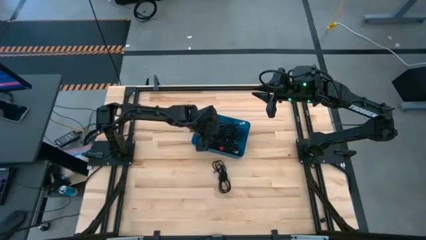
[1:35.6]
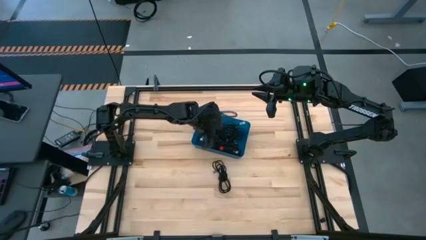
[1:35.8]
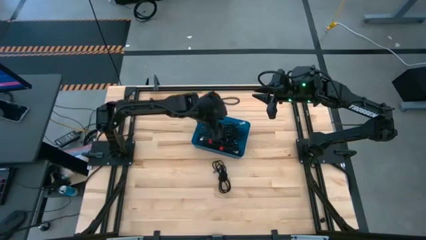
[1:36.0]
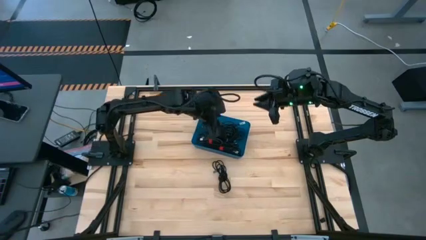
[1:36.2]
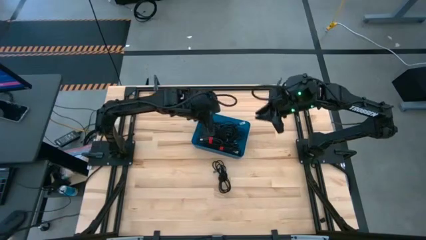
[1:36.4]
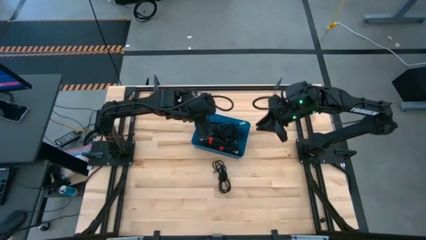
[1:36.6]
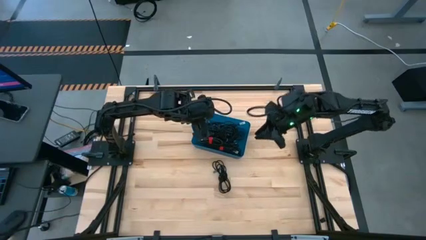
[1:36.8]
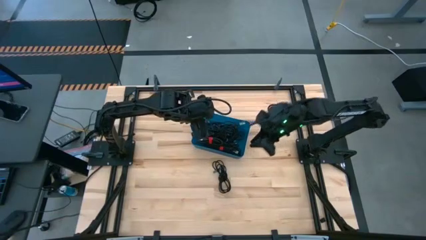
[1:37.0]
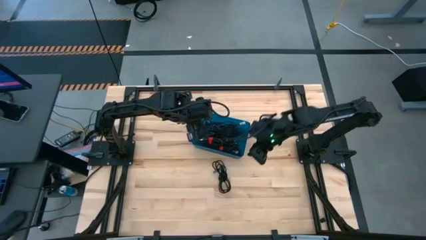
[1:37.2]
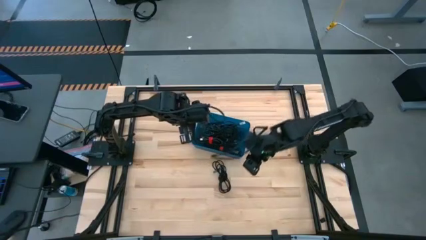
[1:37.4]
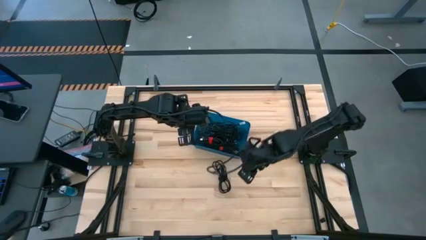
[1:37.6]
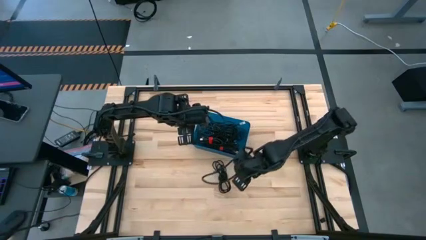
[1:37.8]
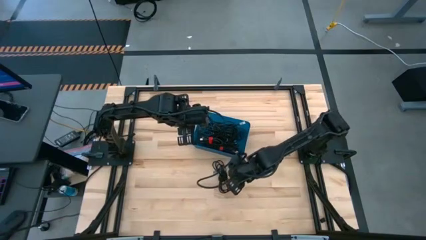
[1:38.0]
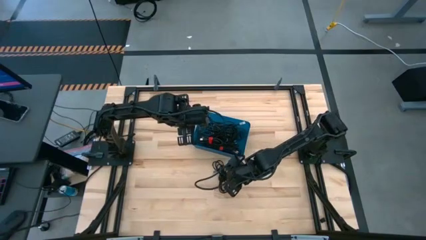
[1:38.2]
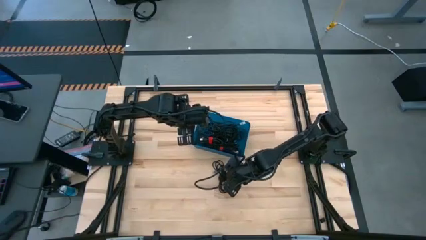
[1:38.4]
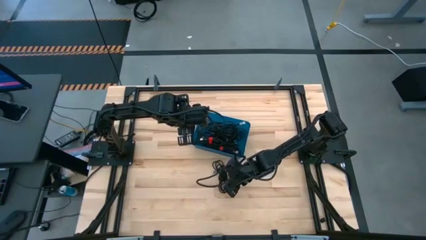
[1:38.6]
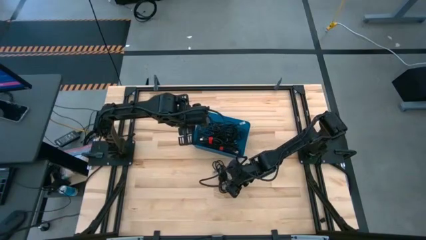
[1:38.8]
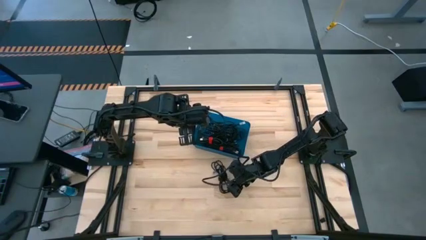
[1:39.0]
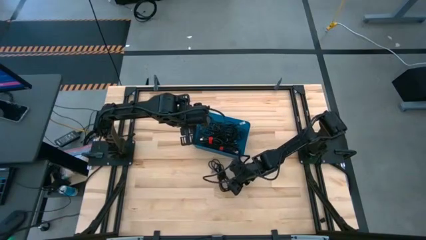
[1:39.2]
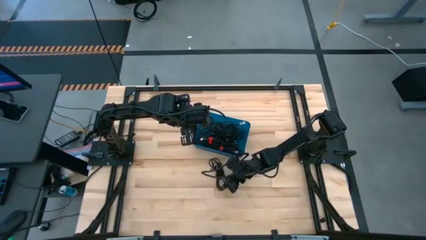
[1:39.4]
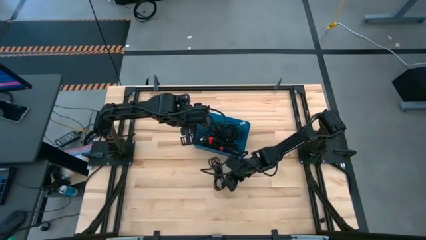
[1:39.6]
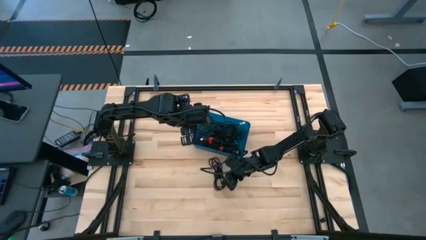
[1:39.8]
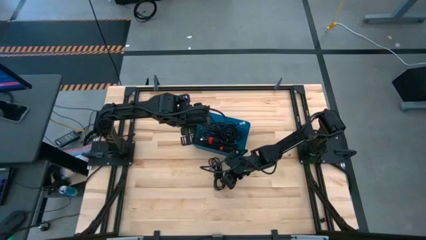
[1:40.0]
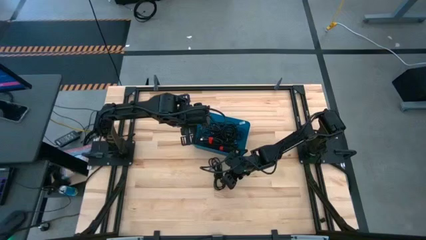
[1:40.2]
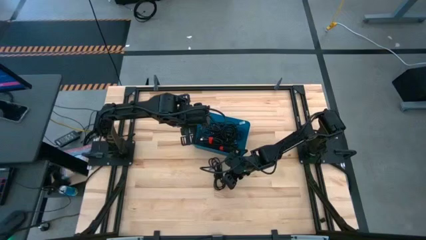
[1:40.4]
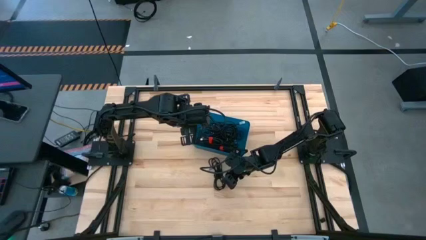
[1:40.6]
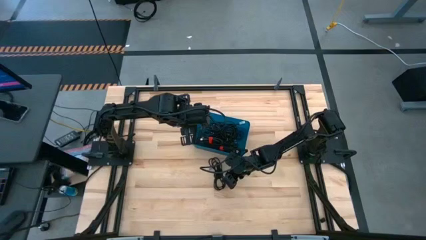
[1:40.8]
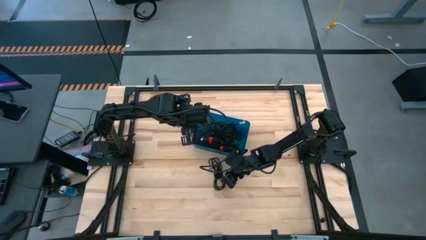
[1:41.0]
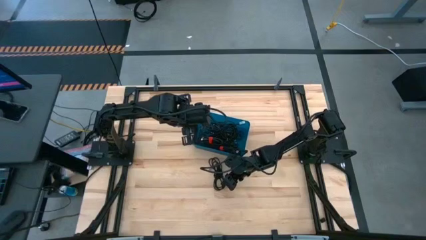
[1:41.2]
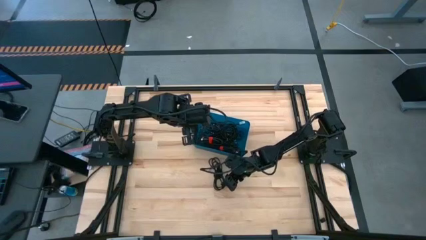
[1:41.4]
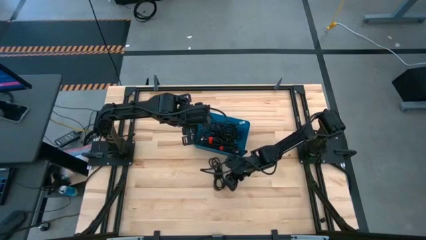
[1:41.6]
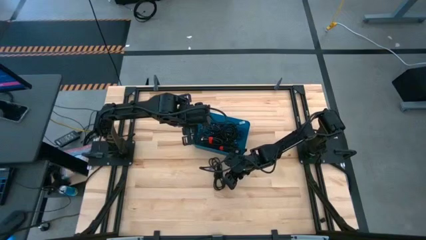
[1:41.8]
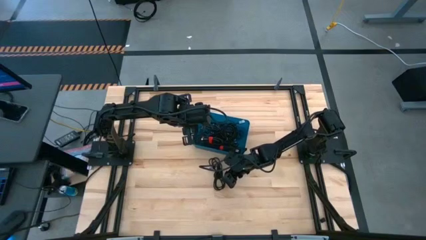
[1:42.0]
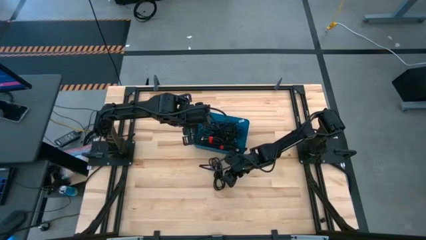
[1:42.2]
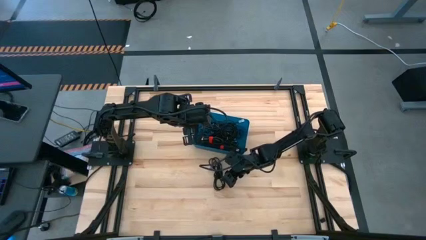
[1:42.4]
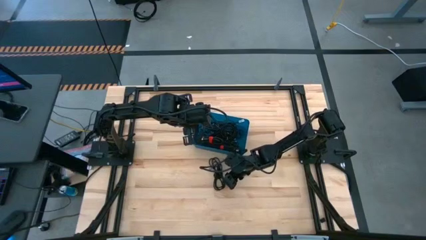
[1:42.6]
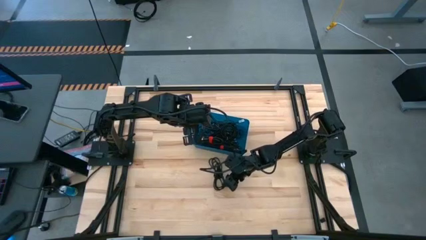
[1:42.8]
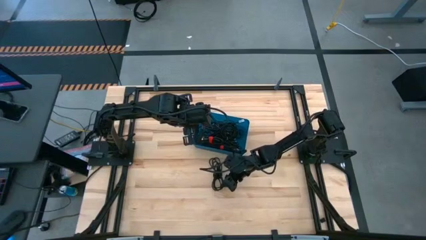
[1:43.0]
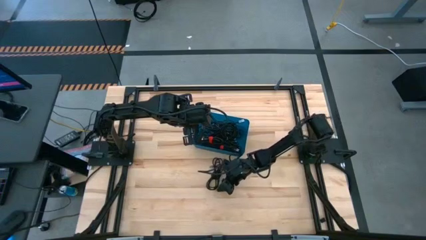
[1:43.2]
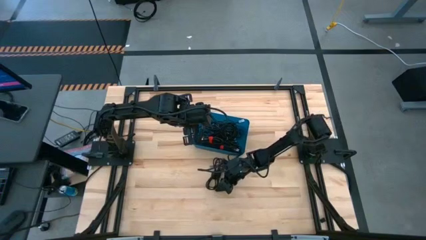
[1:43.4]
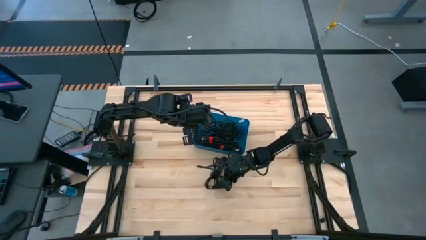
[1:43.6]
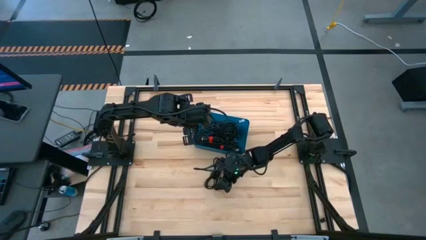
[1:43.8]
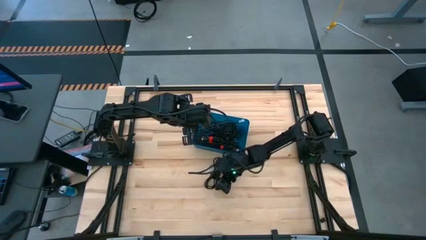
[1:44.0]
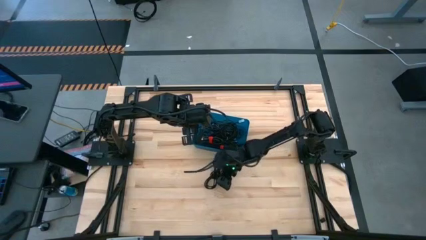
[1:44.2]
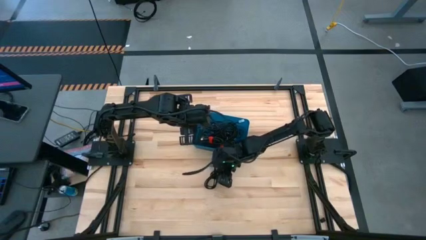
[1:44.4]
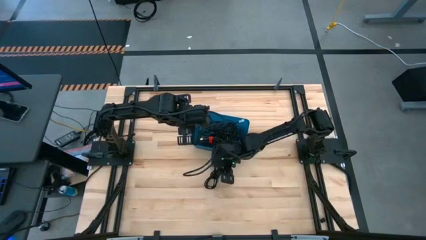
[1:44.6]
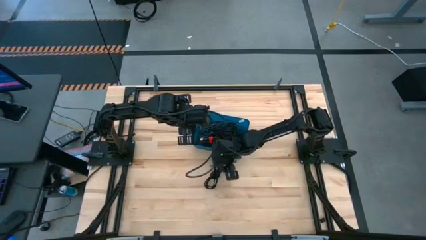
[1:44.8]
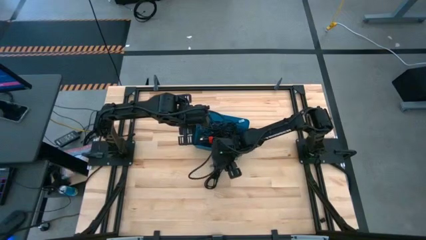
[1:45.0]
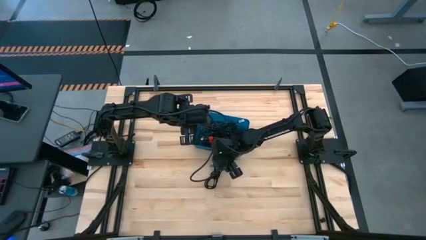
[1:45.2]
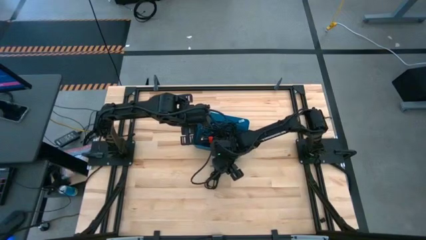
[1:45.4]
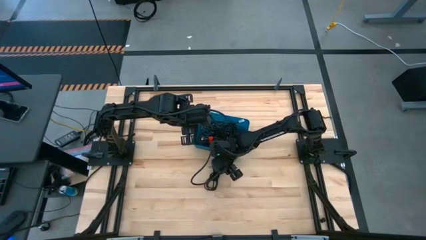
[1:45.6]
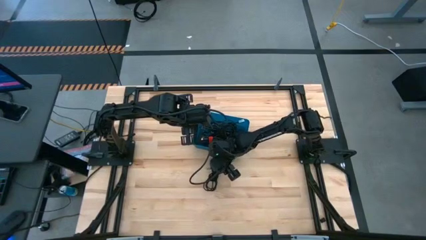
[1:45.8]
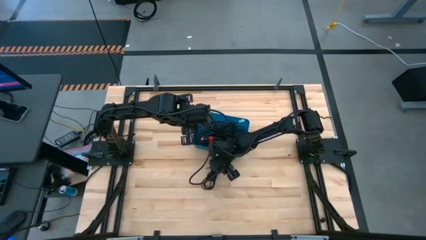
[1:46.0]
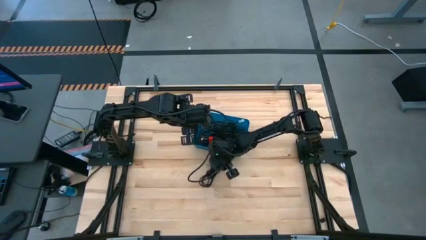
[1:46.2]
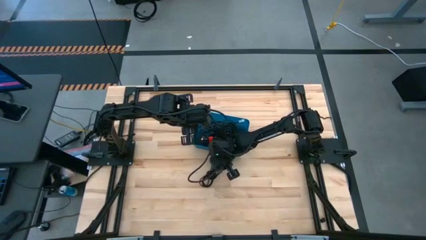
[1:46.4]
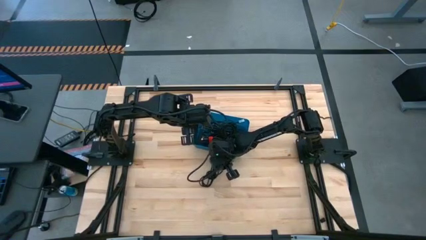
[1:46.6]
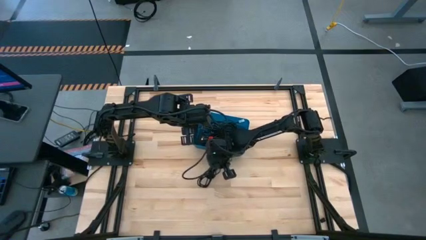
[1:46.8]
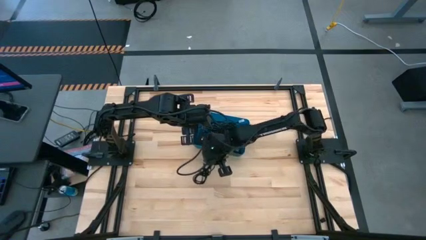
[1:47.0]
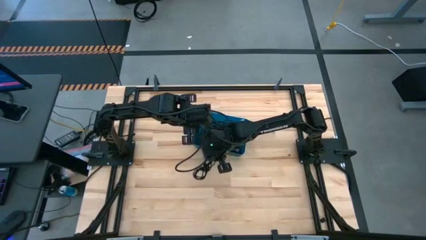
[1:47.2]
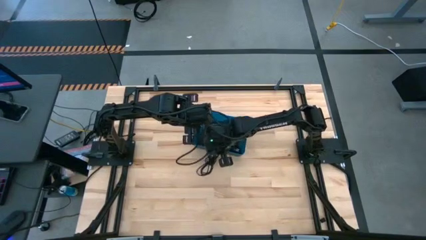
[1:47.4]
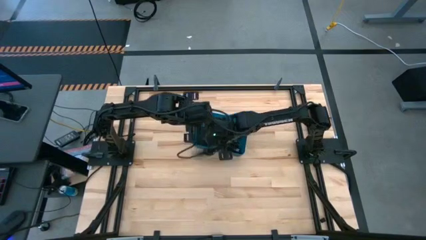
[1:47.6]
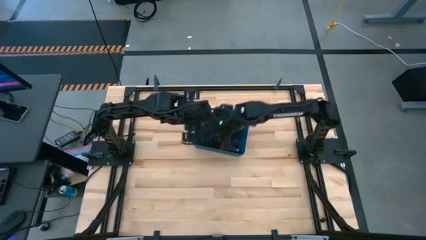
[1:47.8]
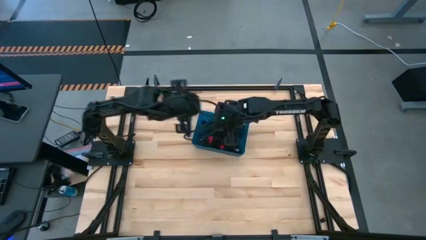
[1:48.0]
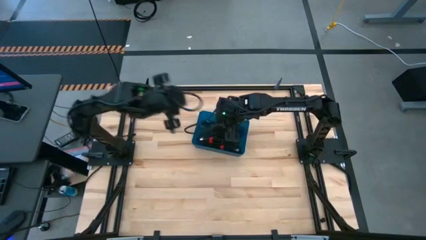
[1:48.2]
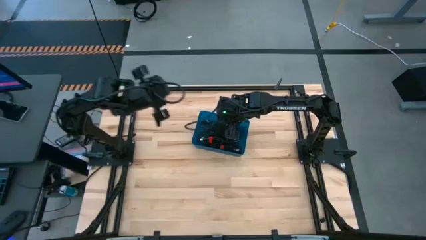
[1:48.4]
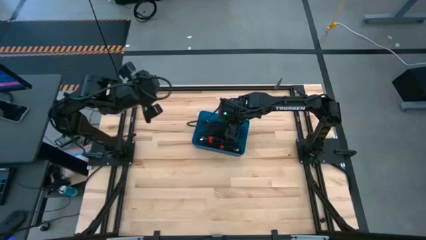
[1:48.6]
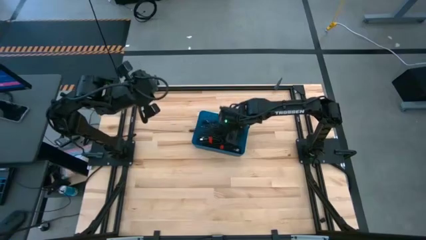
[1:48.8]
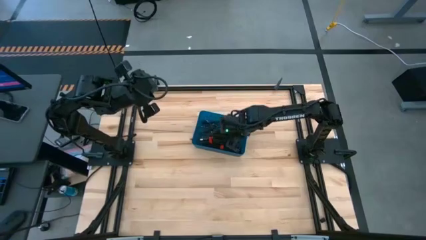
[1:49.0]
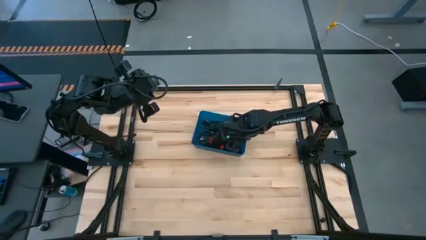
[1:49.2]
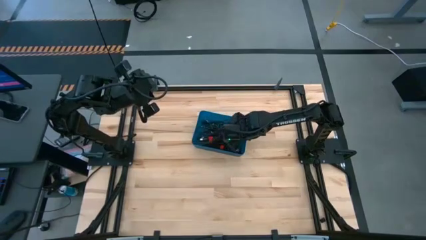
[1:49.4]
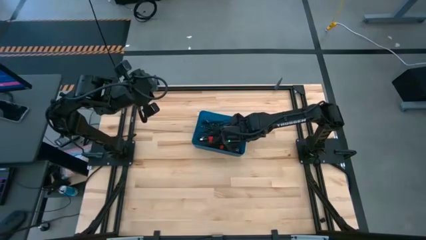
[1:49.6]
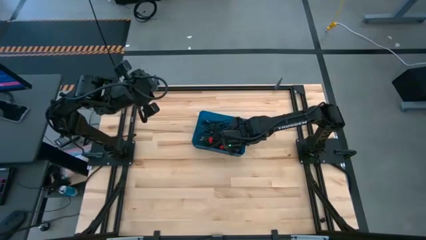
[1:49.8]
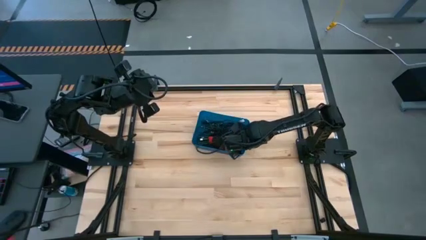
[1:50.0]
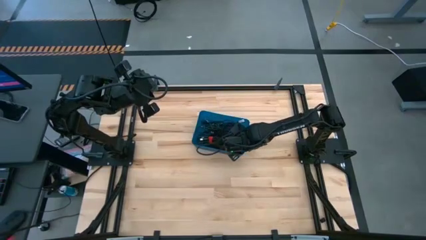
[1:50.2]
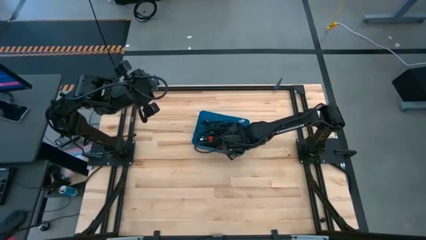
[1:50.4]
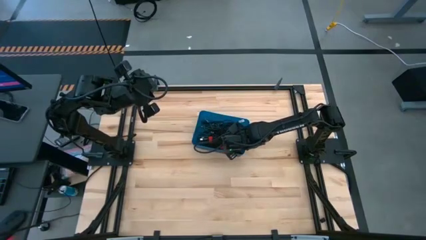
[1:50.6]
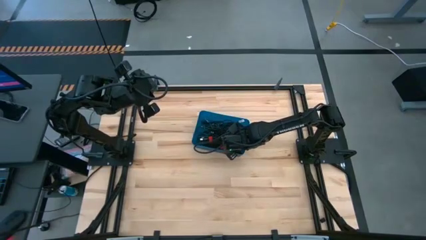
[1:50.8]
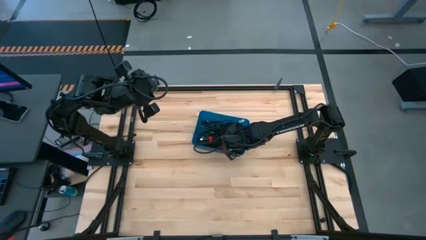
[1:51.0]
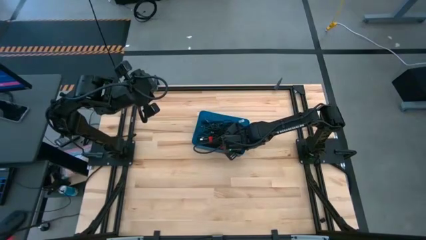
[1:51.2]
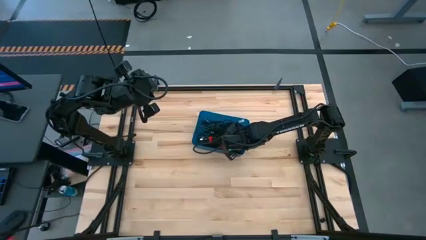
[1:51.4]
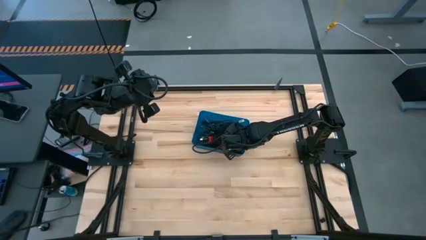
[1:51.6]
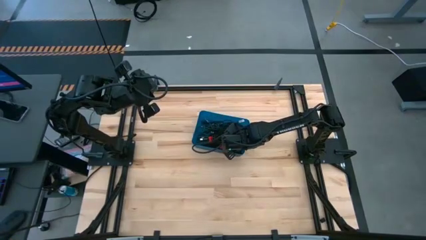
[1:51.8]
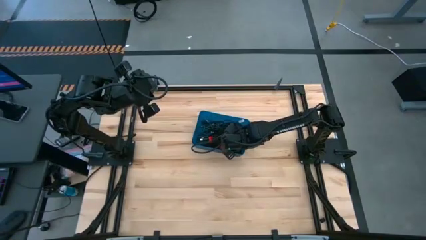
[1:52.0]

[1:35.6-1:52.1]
Task: Pick and place USB-C Cables
Put the black charger cable into the blue bin
